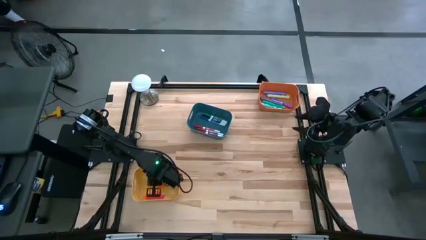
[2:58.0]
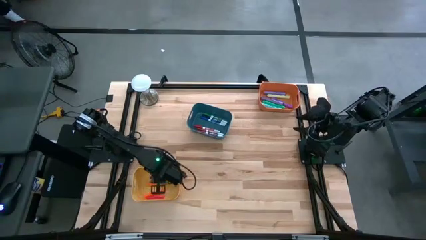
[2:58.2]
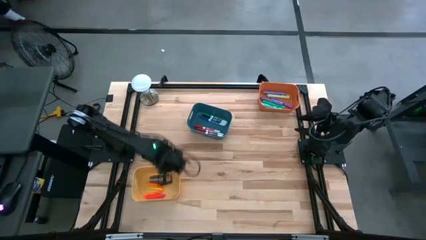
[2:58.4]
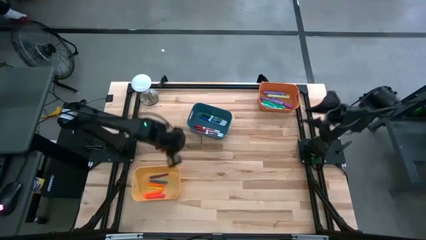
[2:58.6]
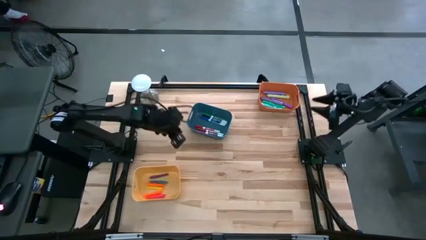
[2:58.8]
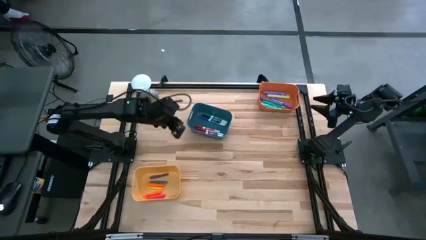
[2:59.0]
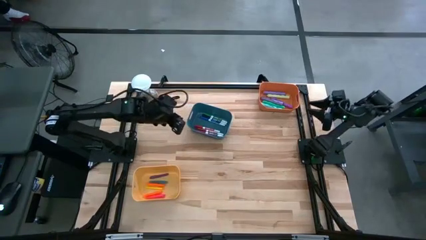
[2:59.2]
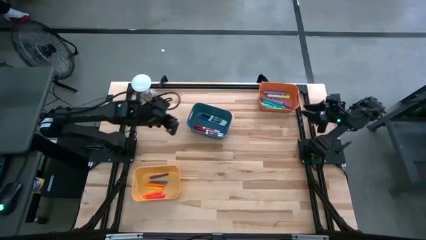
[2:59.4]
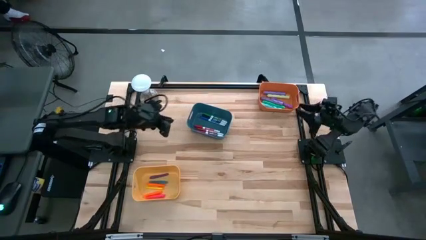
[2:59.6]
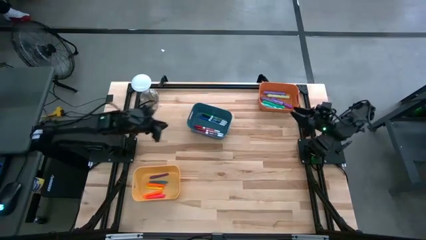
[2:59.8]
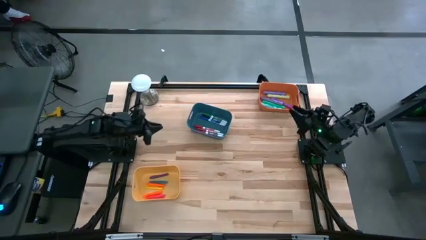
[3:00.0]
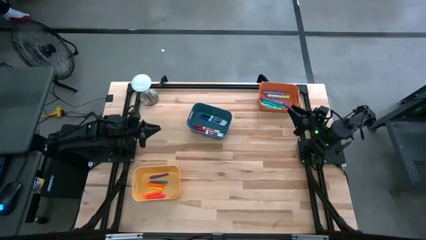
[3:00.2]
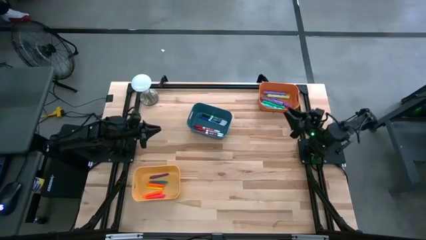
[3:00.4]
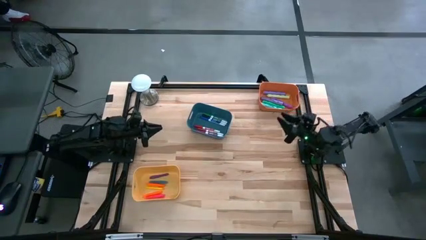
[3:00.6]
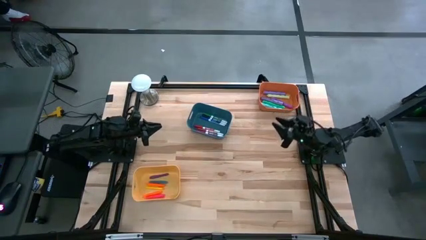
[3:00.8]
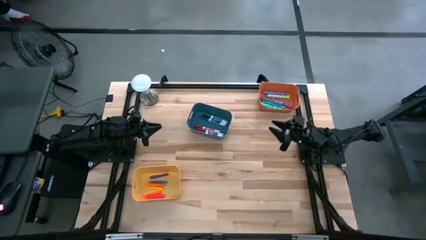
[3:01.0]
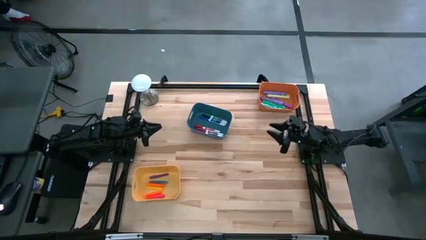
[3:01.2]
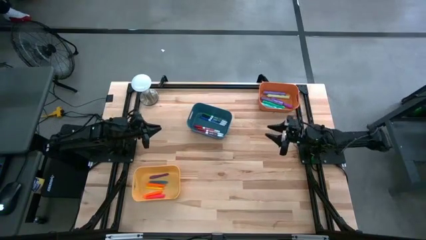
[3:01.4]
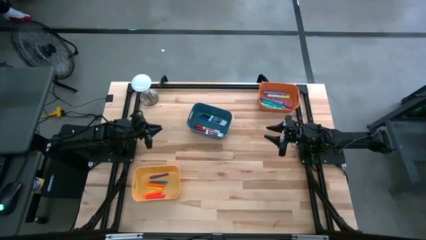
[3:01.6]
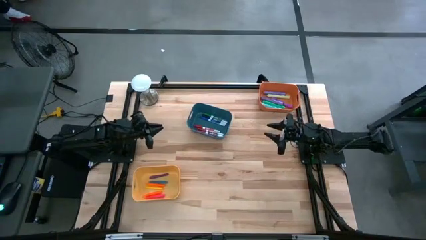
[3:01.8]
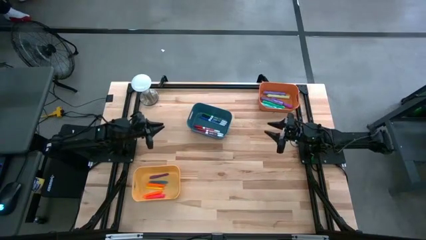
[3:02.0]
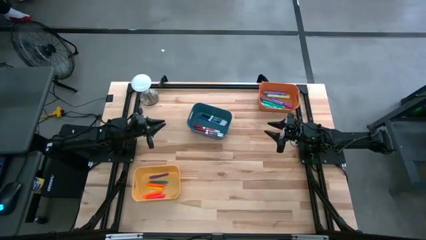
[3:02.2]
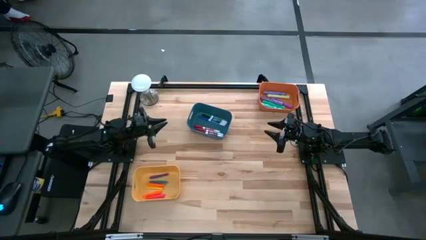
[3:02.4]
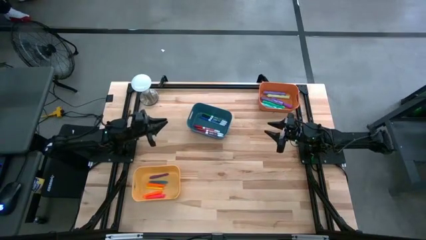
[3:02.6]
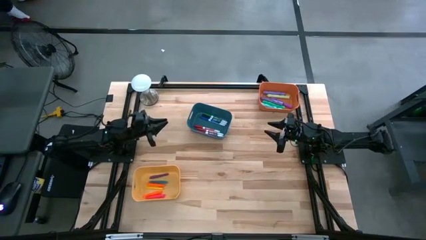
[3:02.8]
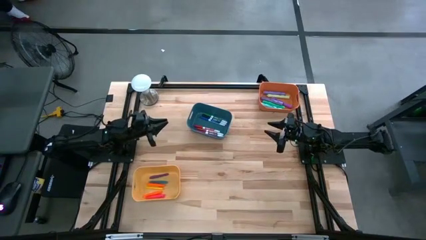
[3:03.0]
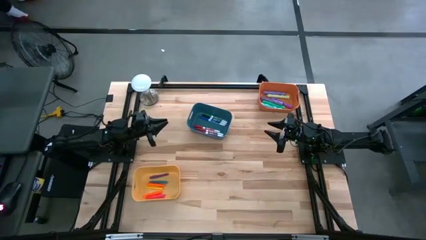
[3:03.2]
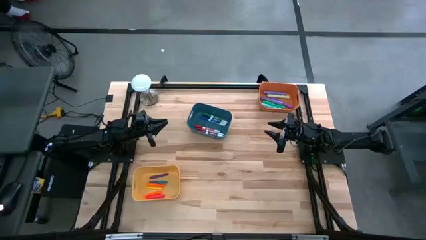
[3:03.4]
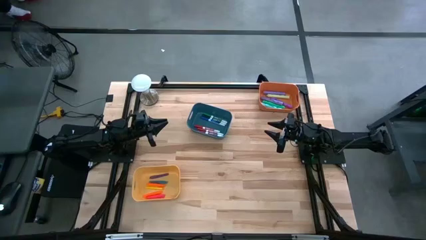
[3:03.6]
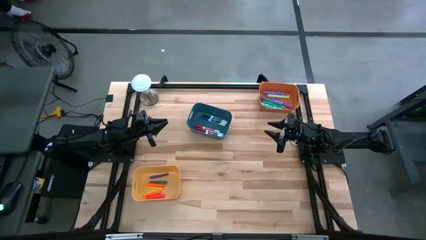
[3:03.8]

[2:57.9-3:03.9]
Task: Pick & Place Markers
Return to Home Position

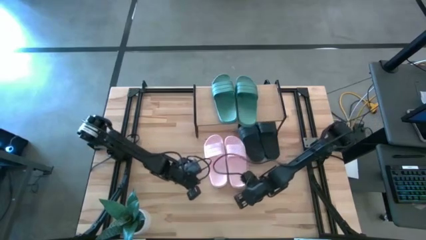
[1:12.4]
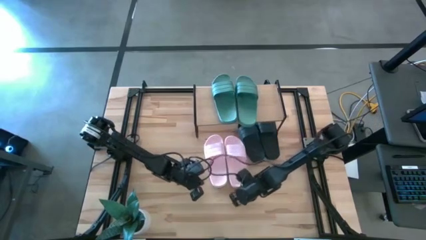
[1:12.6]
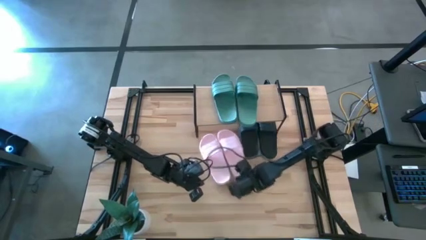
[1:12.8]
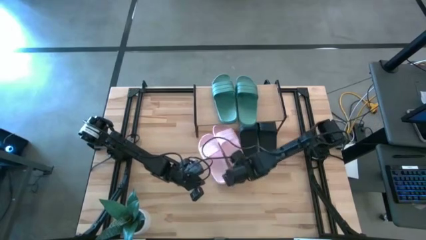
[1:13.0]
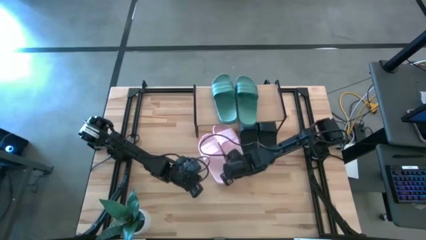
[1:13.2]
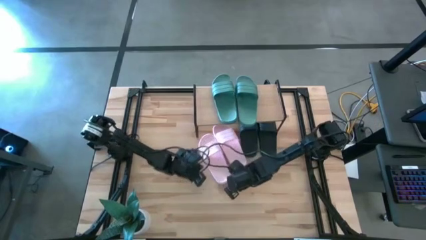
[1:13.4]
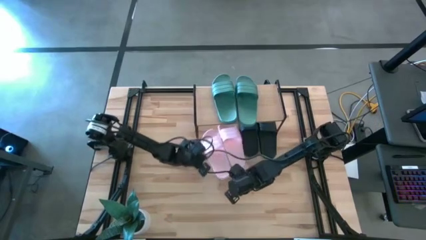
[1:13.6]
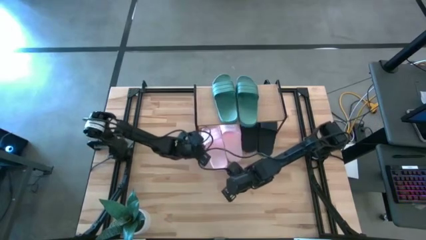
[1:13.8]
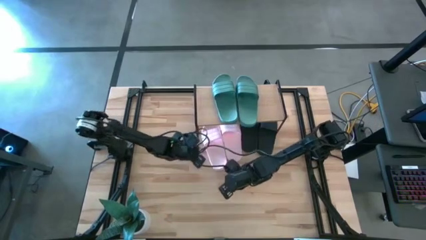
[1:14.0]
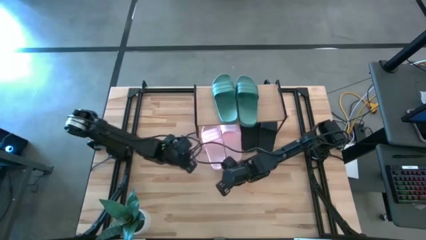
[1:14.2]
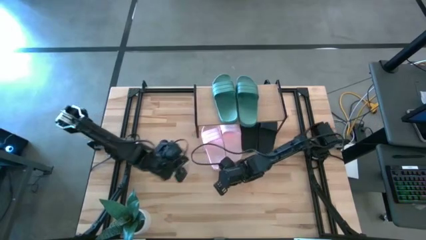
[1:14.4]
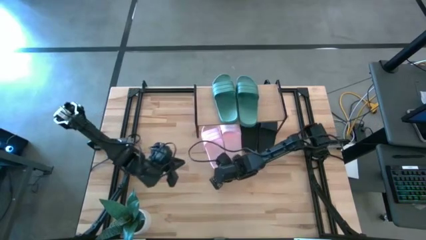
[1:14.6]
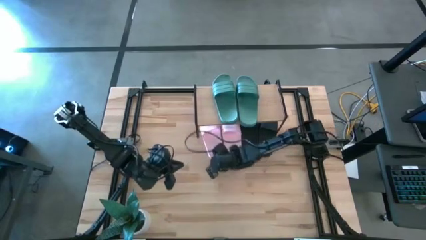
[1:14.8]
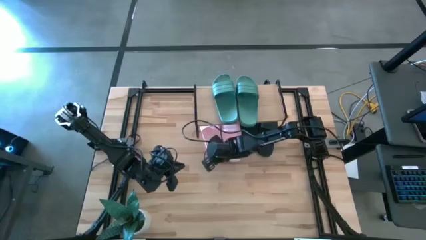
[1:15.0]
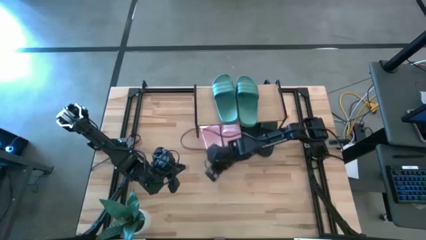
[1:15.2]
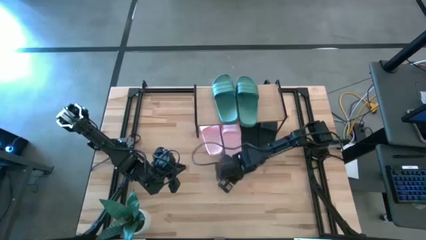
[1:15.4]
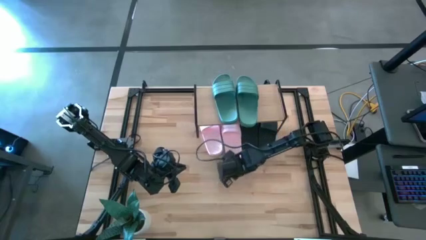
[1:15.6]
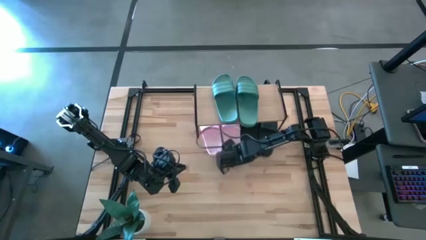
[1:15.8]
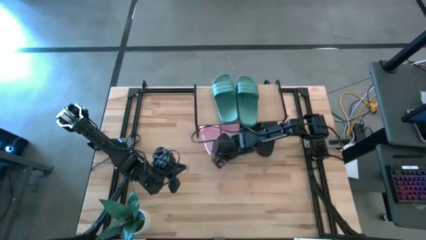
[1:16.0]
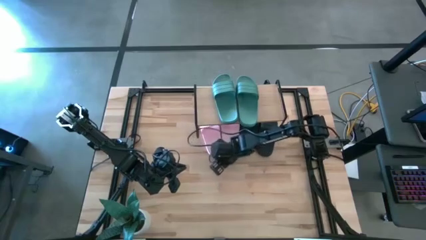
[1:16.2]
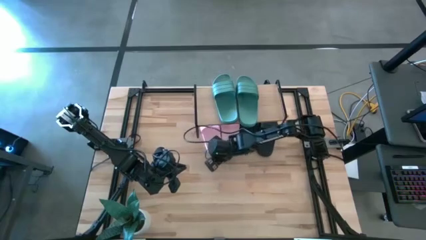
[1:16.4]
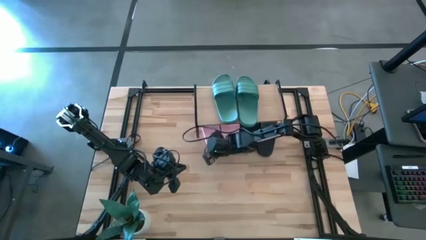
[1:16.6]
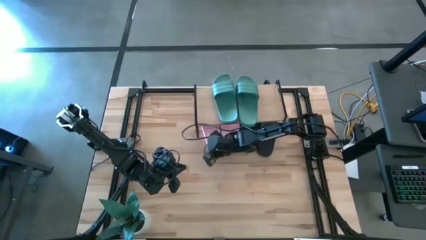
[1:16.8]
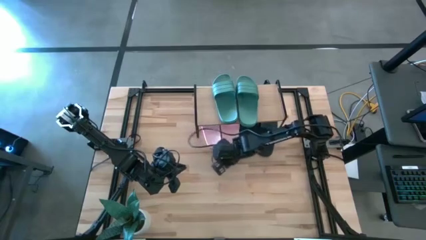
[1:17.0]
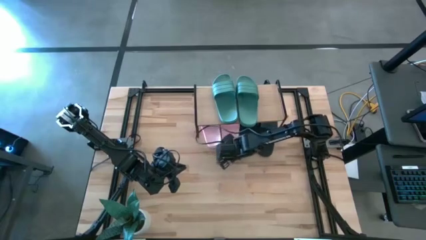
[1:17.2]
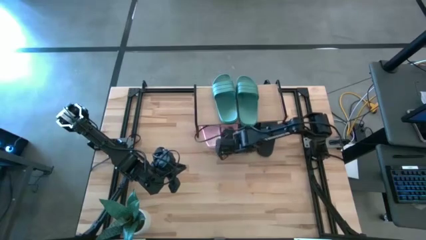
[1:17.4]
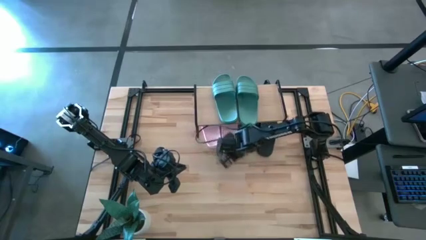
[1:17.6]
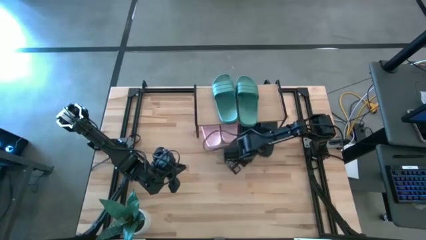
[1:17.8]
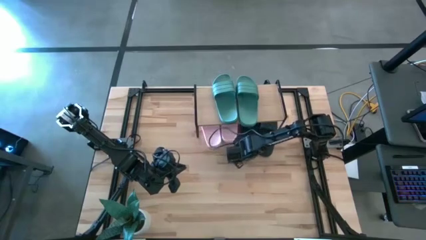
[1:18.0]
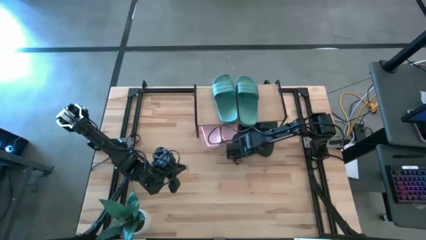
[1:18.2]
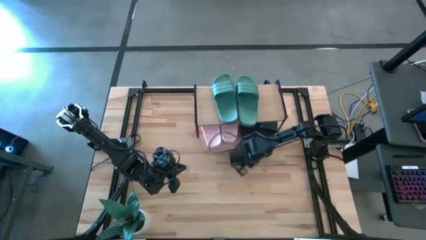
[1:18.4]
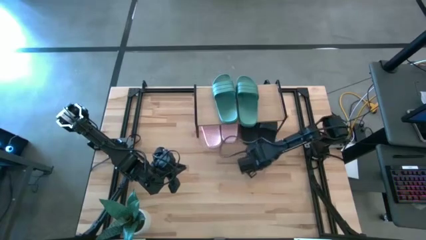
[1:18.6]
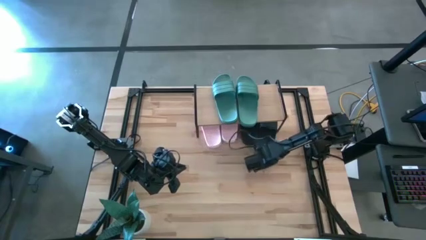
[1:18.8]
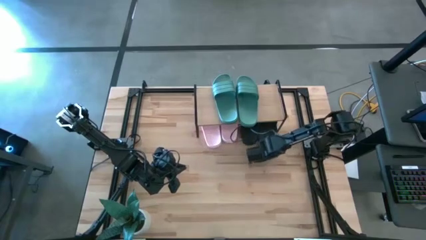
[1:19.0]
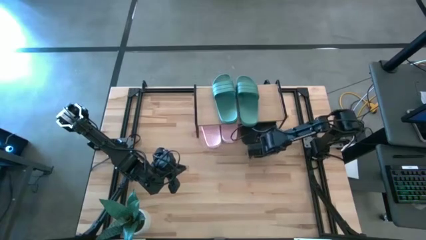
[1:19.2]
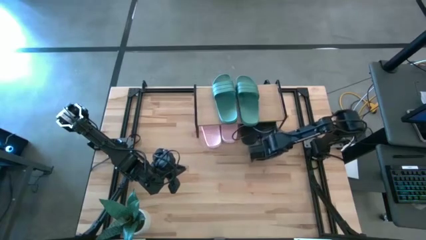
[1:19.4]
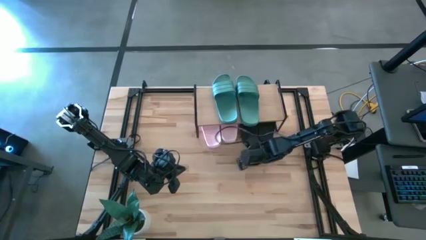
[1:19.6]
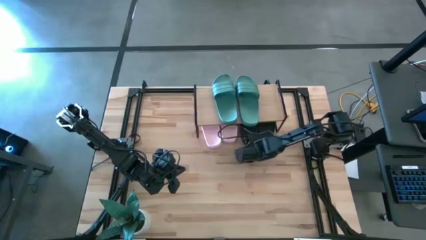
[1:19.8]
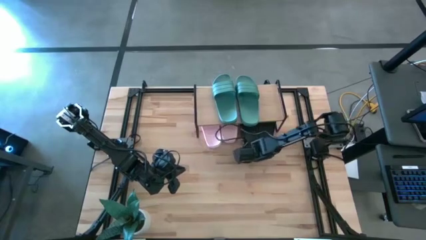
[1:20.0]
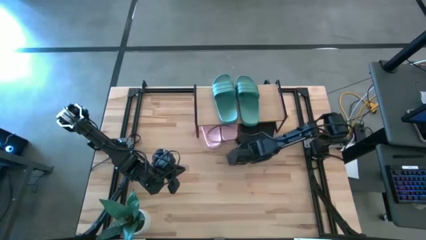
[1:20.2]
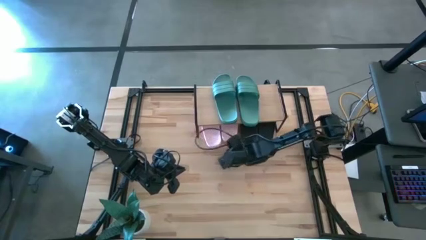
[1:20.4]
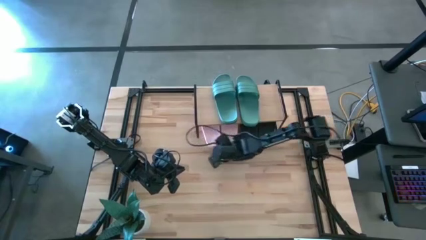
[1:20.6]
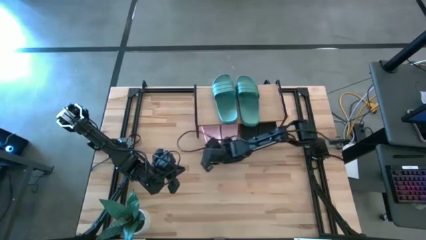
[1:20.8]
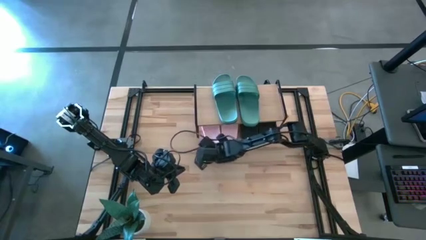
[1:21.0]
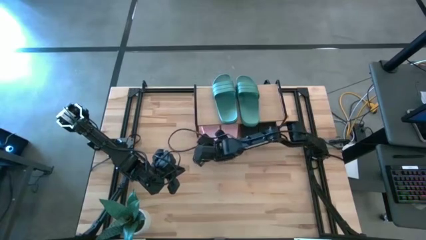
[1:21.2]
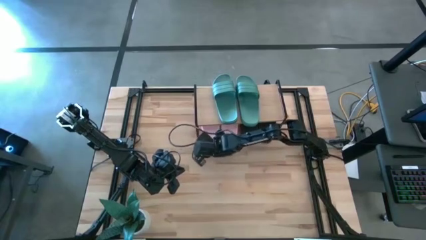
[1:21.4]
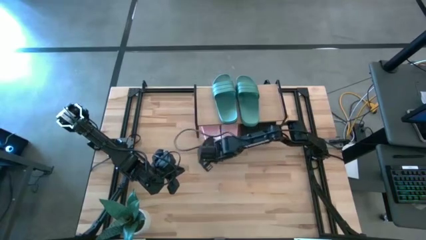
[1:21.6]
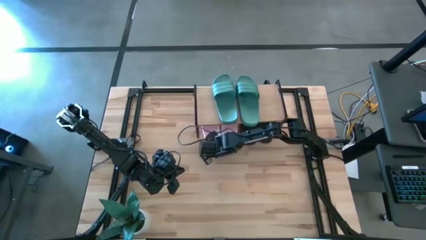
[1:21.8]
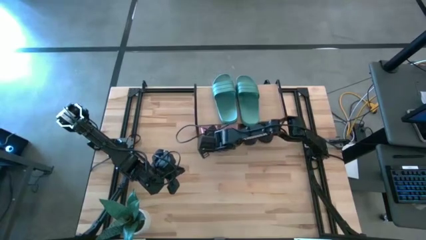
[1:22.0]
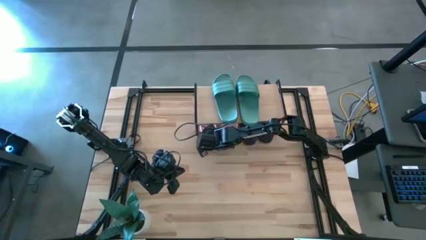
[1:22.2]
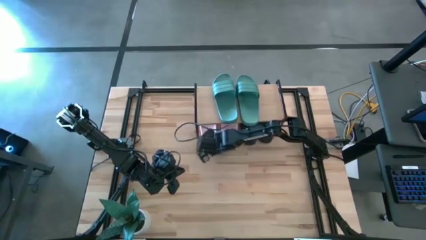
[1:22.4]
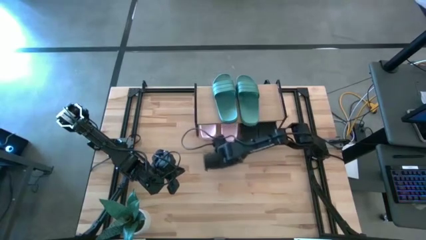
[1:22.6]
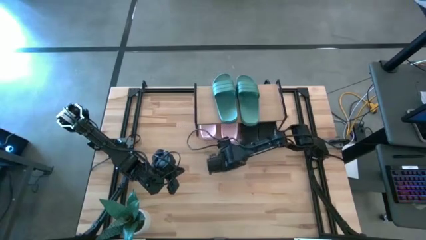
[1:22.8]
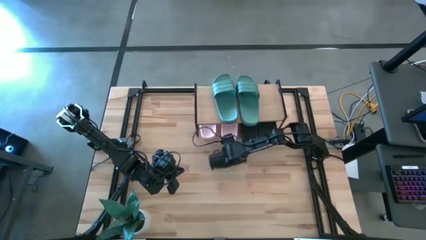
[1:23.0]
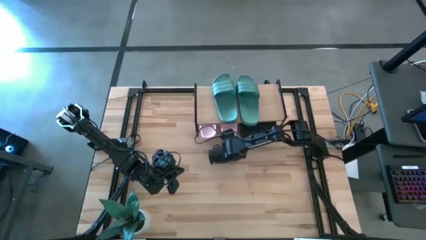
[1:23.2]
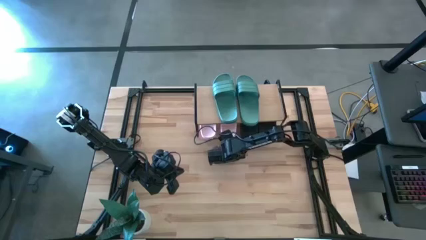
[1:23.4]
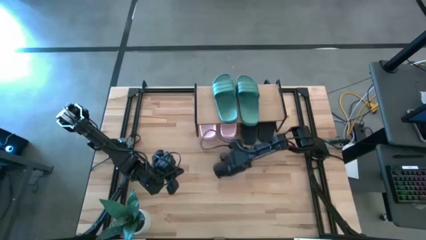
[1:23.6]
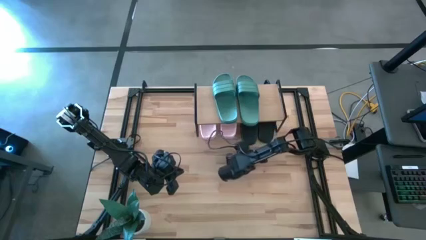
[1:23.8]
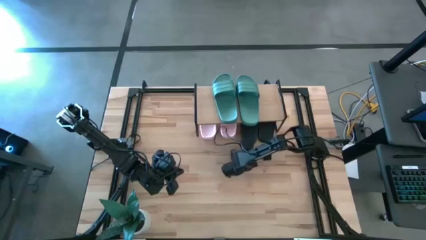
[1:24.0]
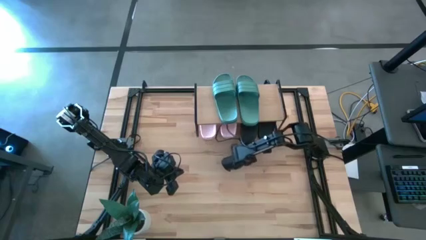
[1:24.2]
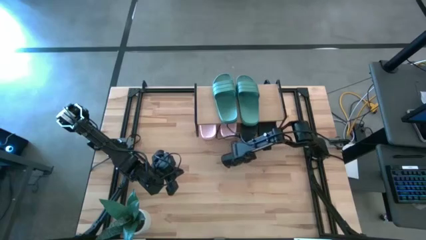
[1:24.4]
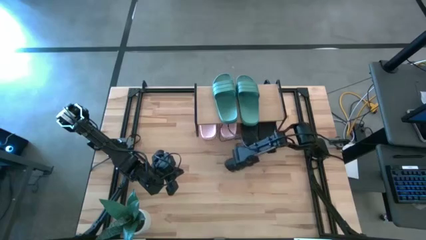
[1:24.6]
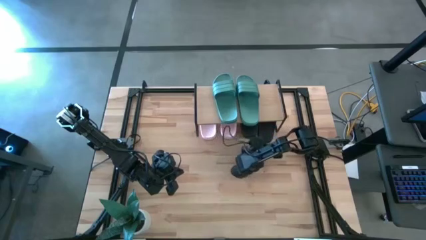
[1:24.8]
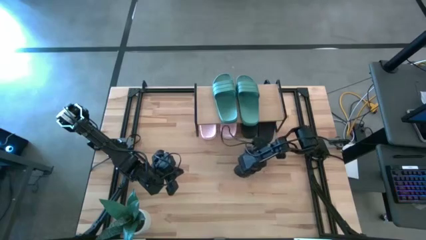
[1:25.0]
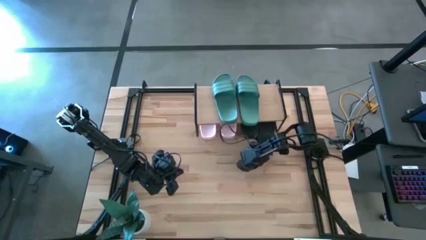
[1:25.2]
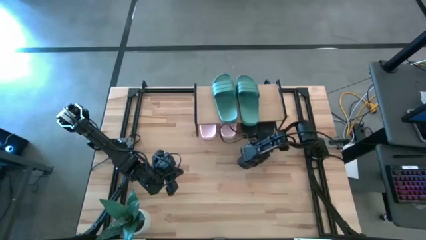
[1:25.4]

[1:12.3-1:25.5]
Task: Pick and place slides into the shelf
Adjust the slides under the shelf
